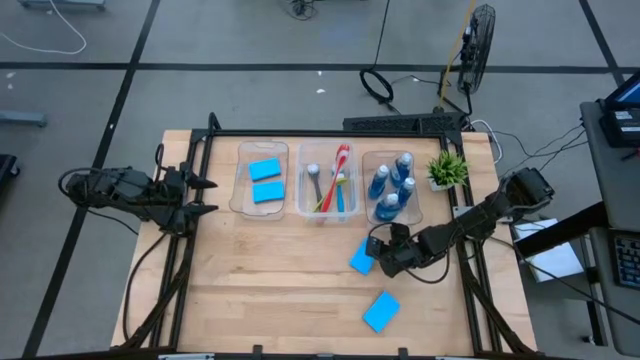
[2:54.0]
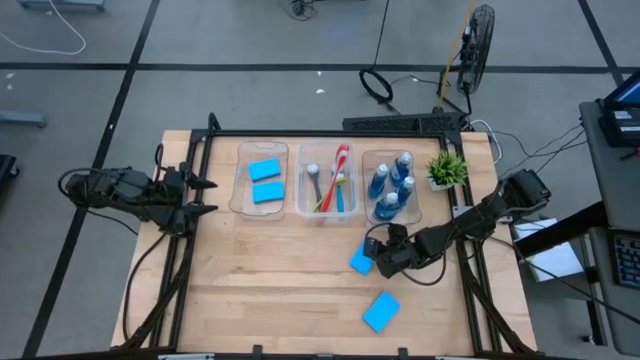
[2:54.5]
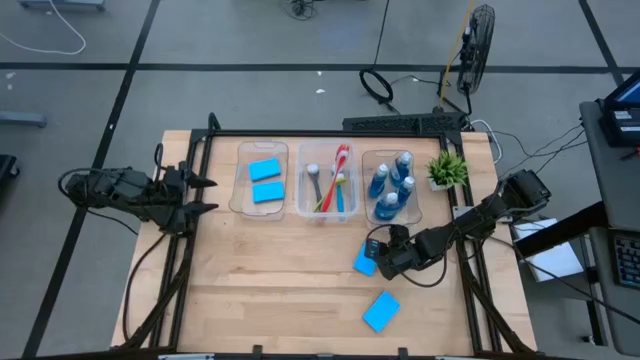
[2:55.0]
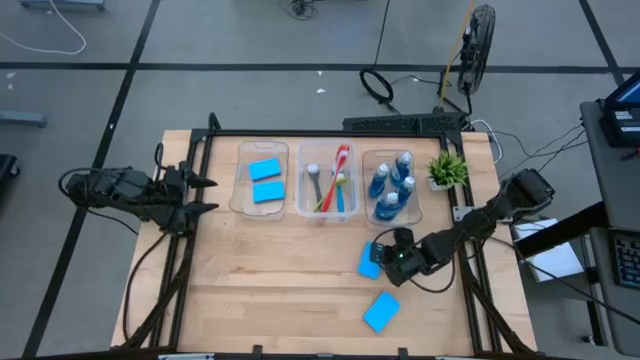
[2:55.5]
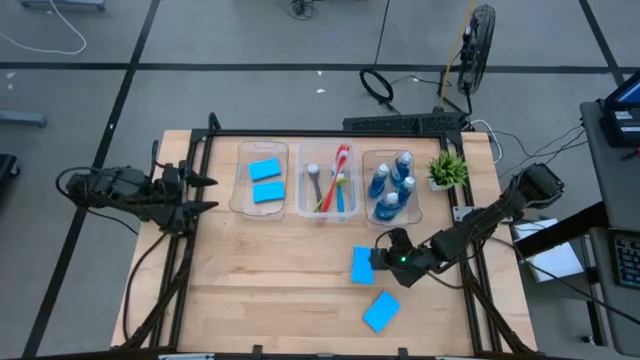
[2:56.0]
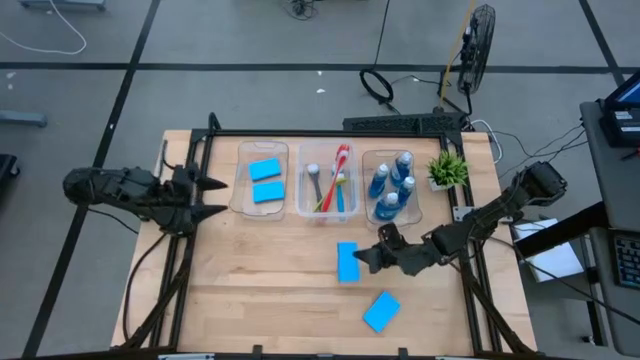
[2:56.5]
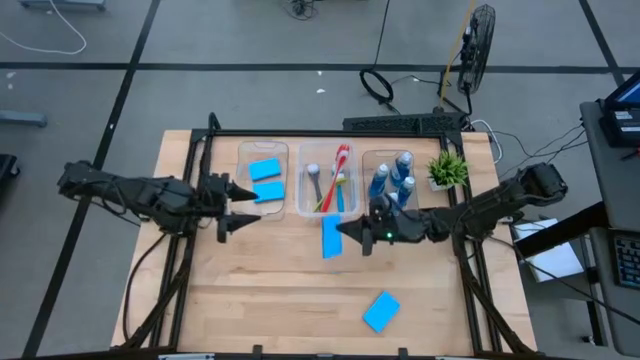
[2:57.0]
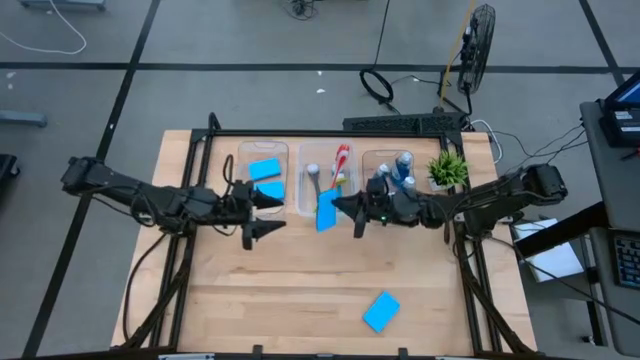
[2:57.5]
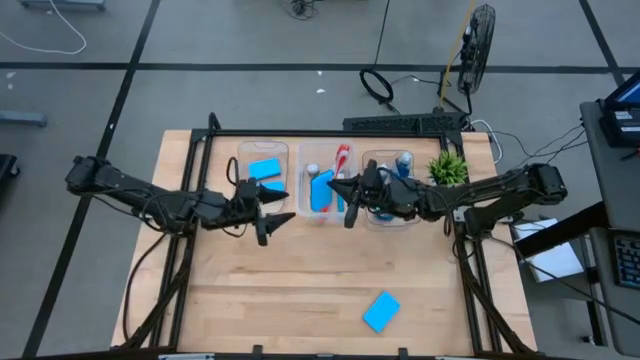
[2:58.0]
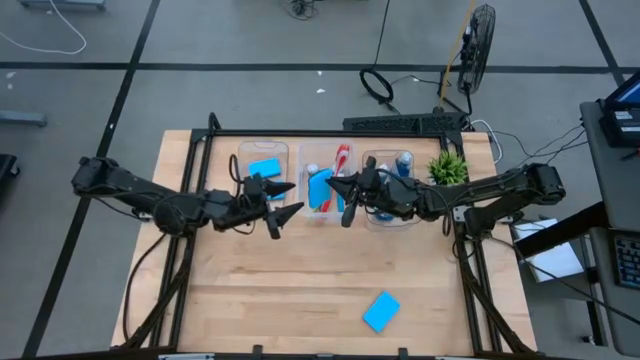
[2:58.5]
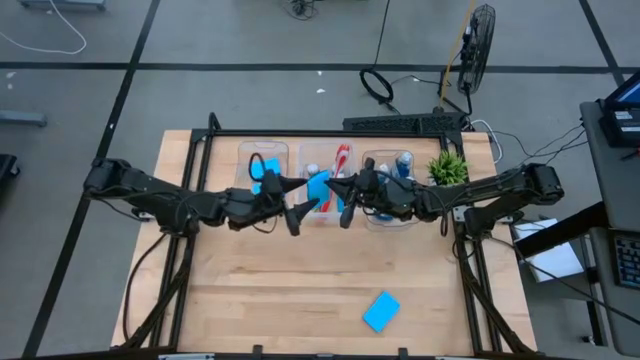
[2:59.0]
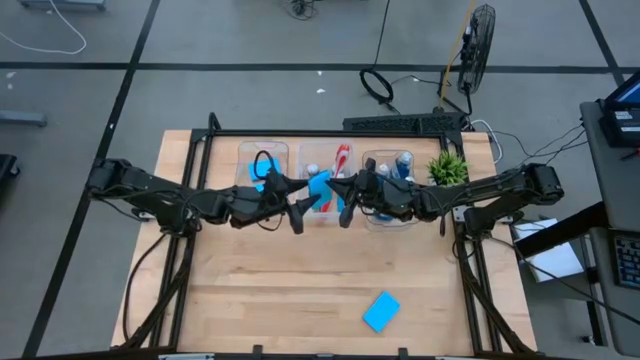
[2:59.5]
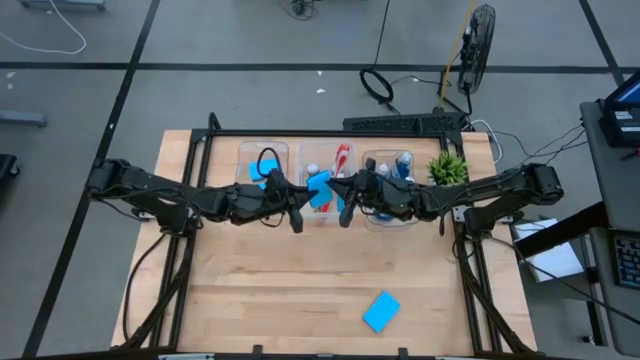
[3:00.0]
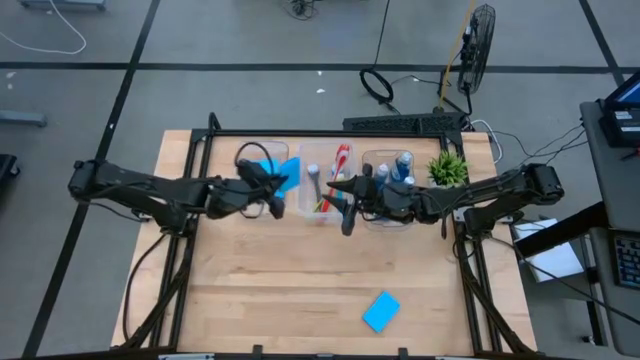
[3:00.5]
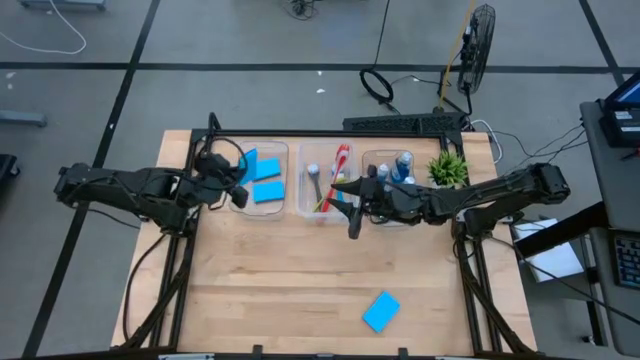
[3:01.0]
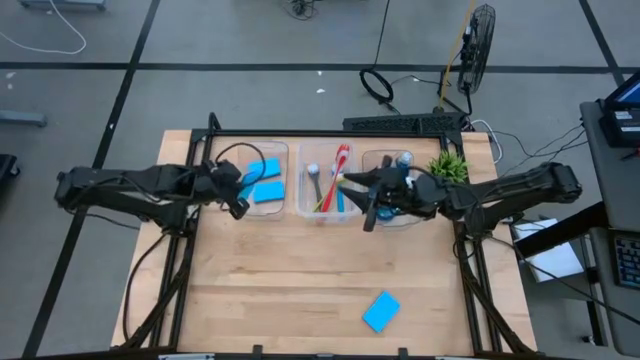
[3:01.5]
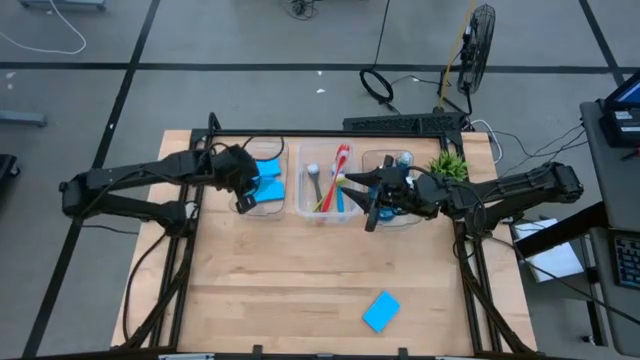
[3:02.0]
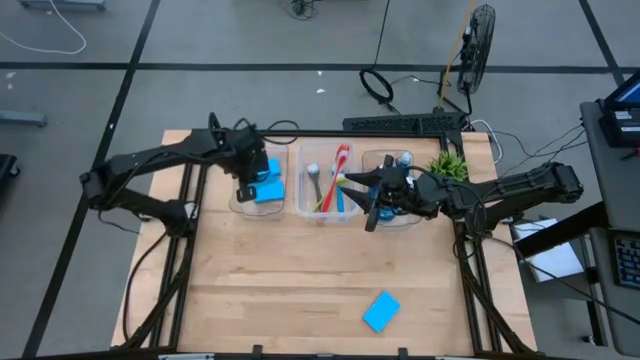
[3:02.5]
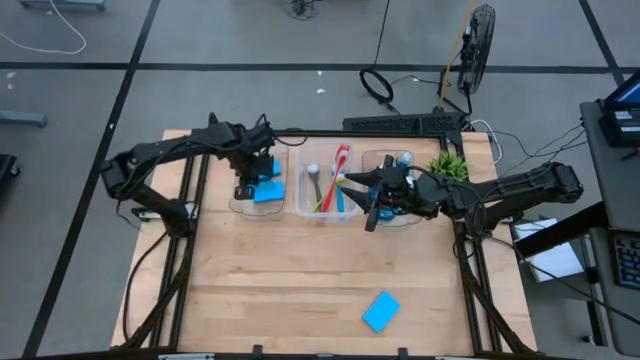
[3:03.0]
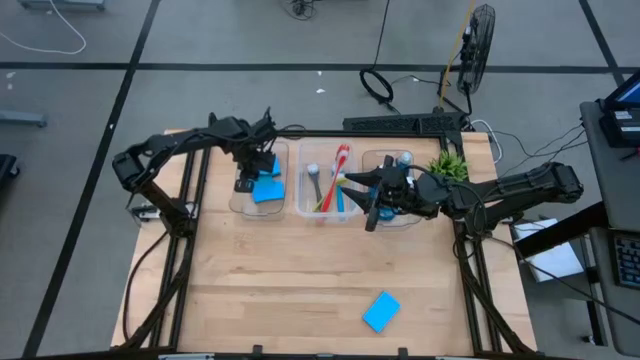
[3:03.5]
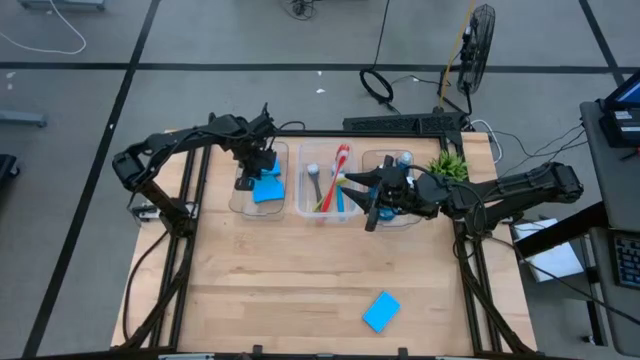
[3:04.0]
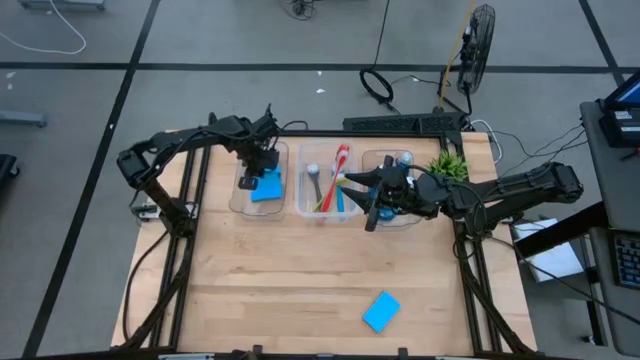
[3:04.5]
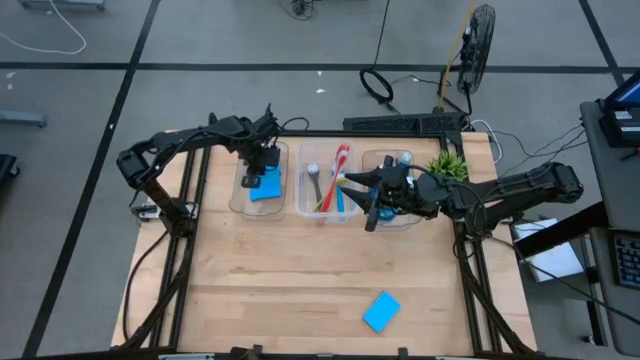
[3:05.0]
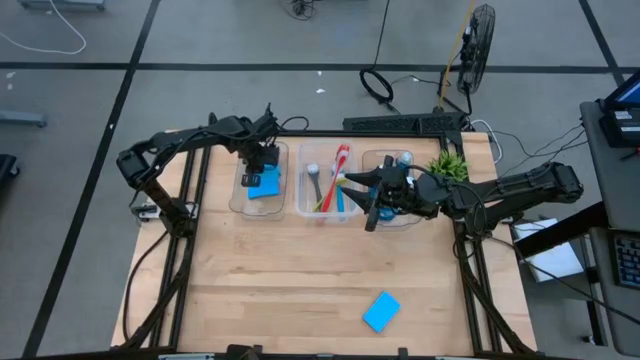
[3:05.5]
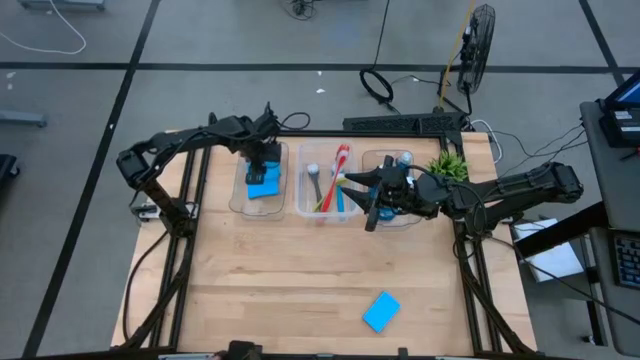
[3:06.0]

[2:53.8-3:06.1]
Task: Pick & Place Kitchen Sink Supplies
Put the blue sponge into the left transparent bin

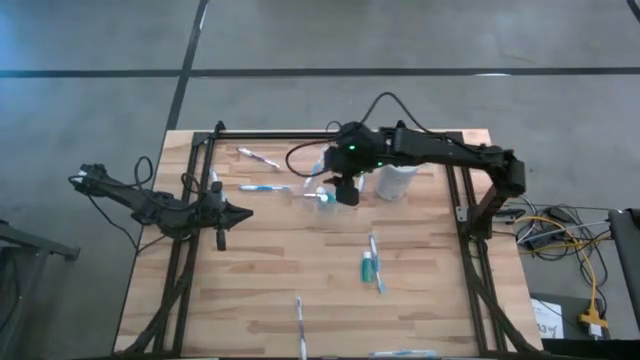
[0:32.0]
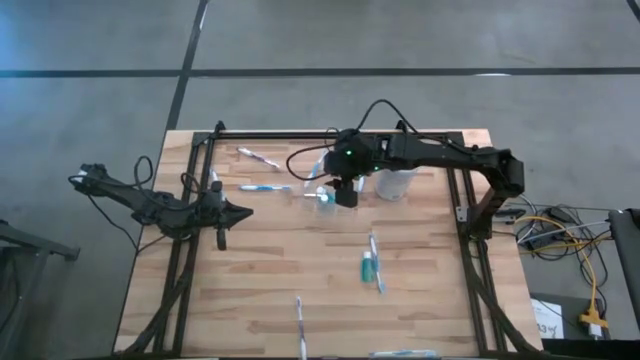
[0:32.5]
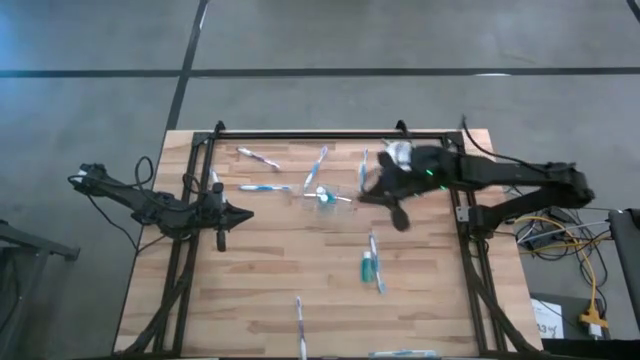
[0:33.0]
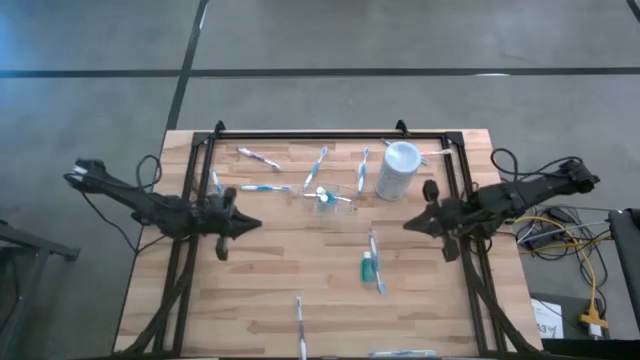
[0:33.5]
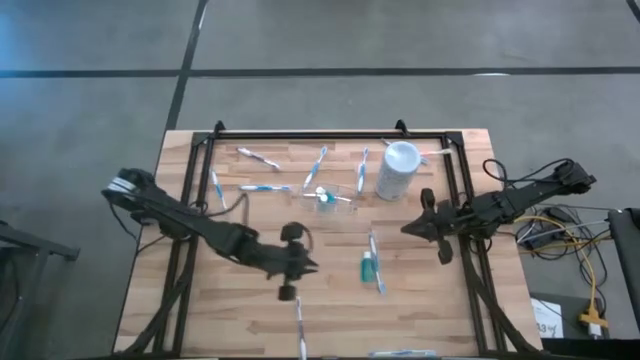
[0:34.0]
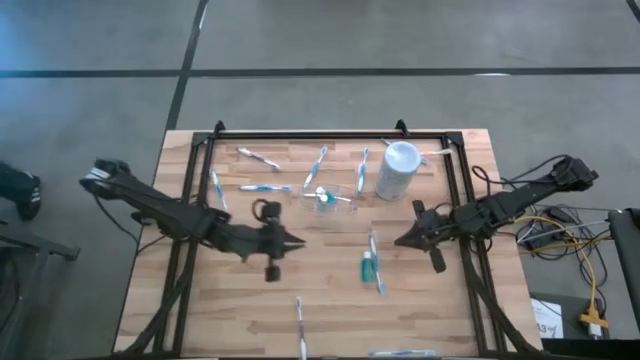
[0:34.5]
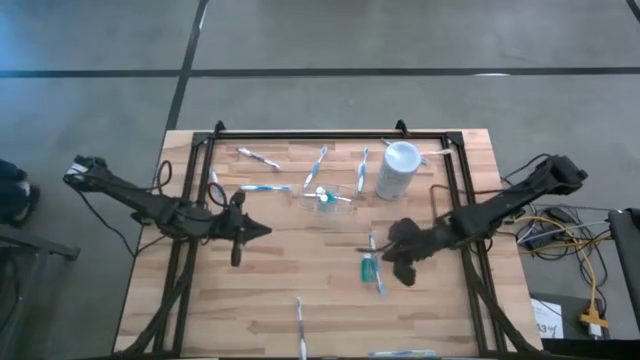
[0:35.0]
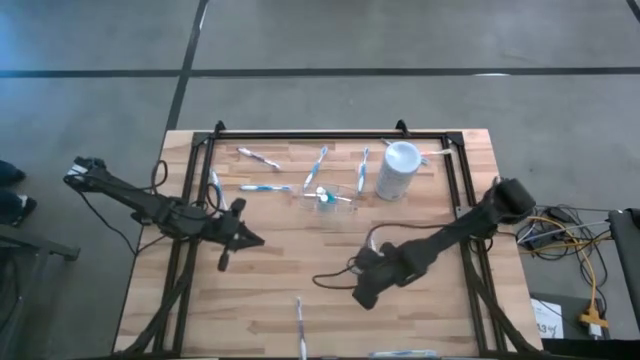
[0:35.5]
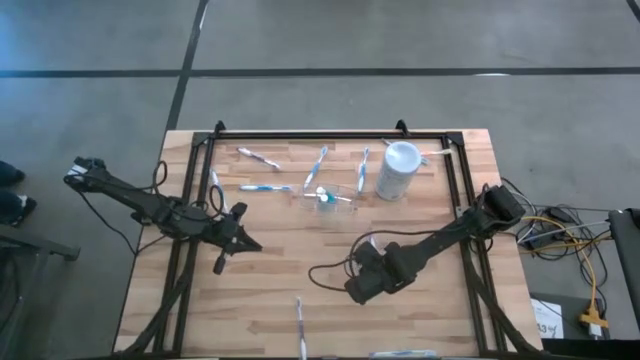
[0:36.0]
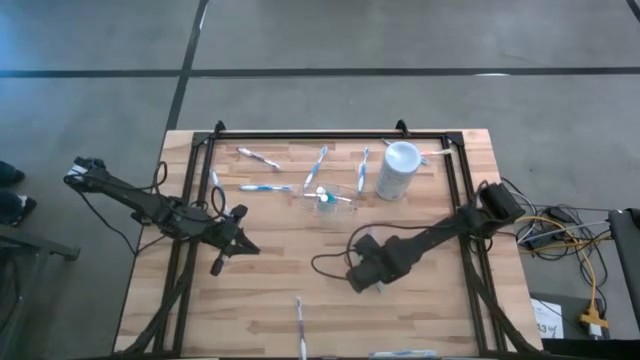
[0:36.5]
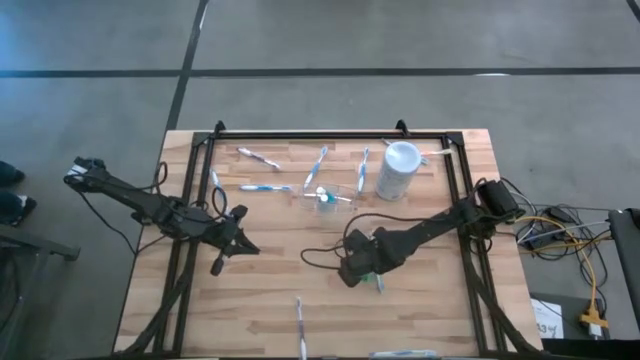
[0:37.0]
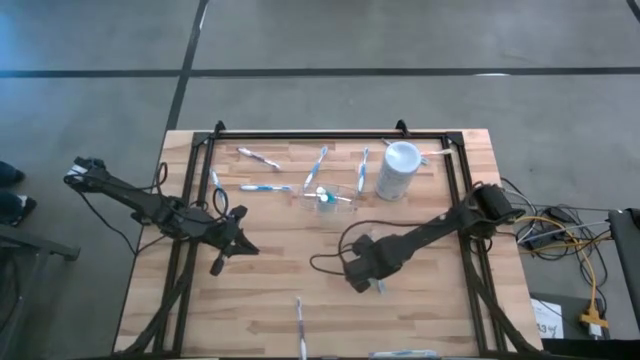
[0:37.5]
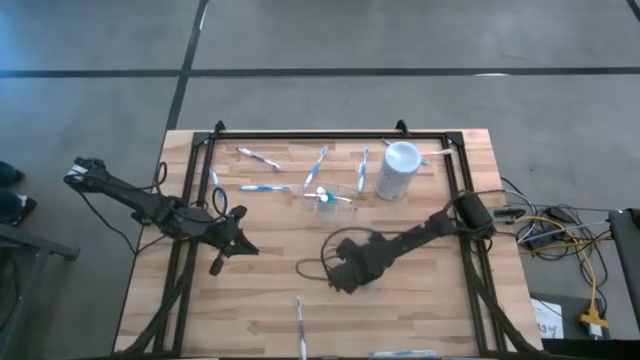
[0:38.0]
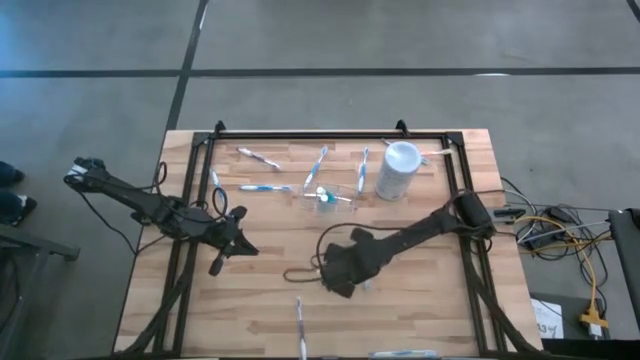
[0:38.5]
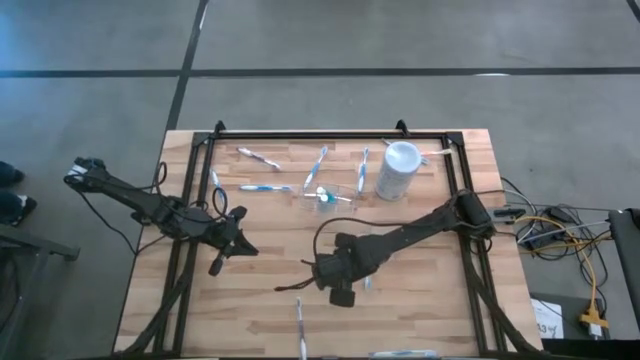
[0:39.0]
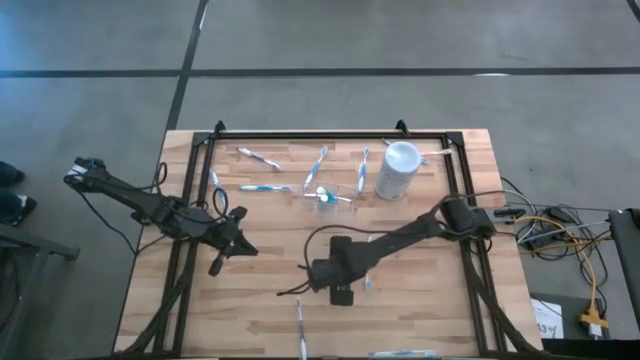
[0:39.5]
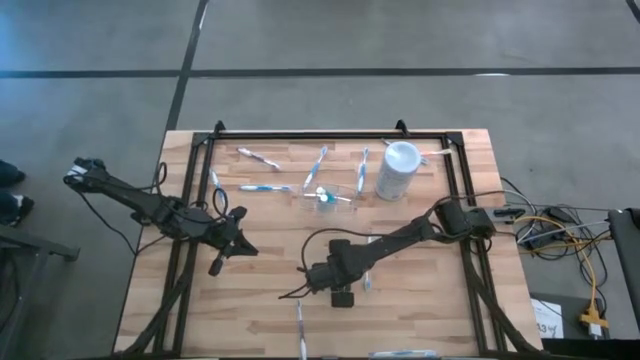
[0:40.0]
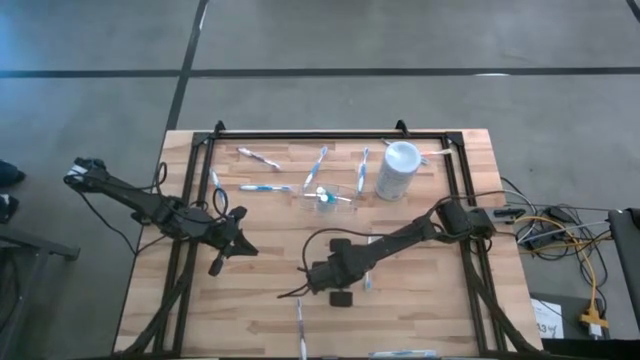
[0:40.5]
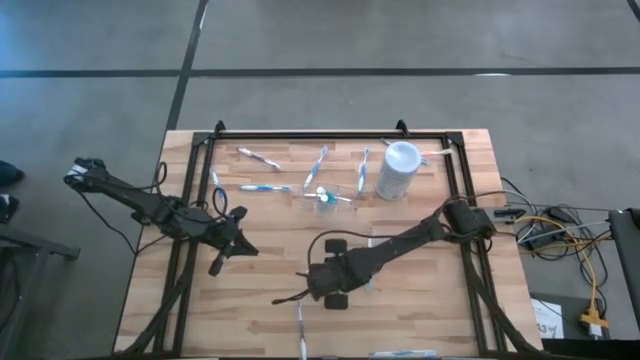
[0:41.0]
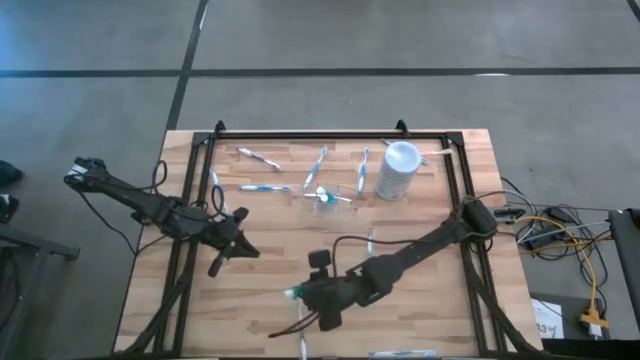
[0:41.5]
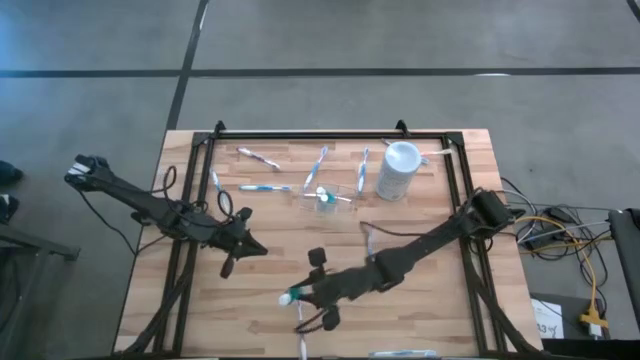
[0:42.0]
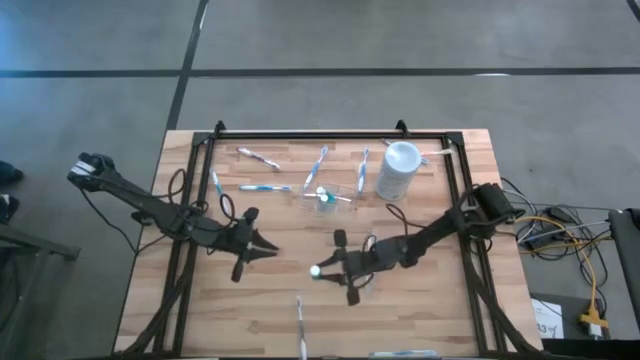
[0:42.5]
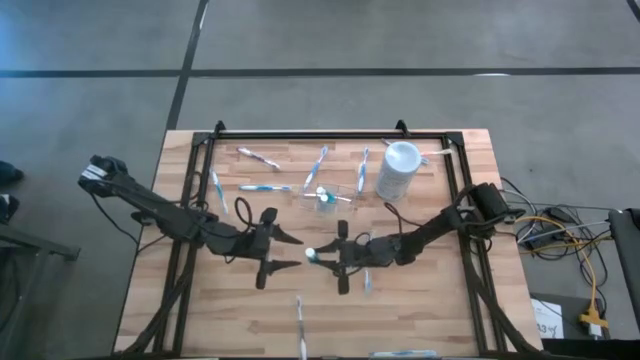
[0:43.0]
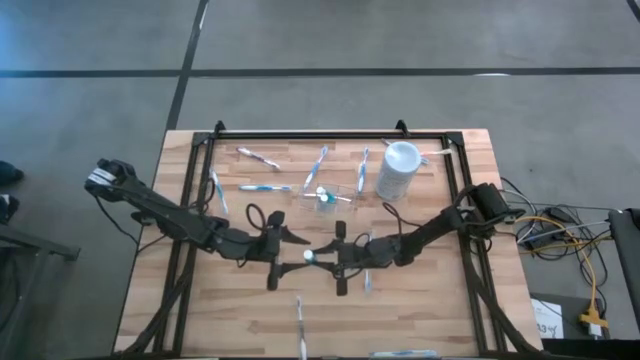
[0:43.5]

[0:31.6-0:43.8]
Task: Pick & Place toothbrushing station
Put the mouthwash into the transparent organizer
